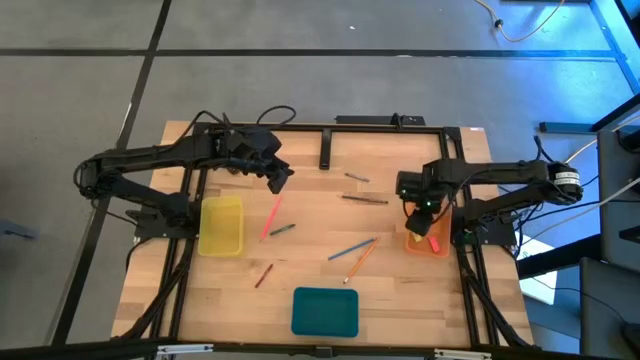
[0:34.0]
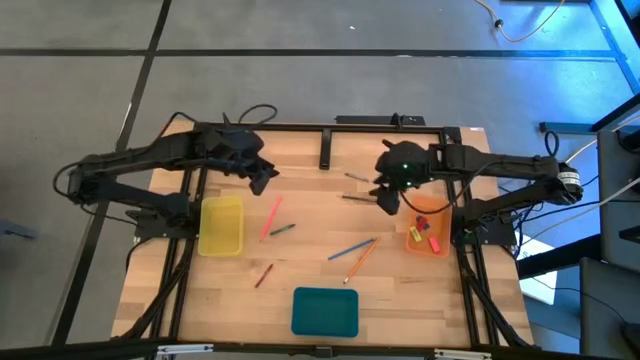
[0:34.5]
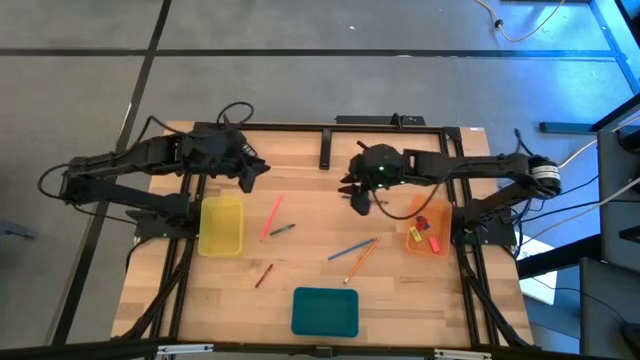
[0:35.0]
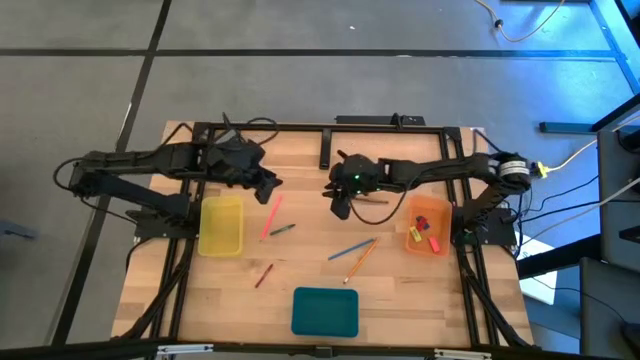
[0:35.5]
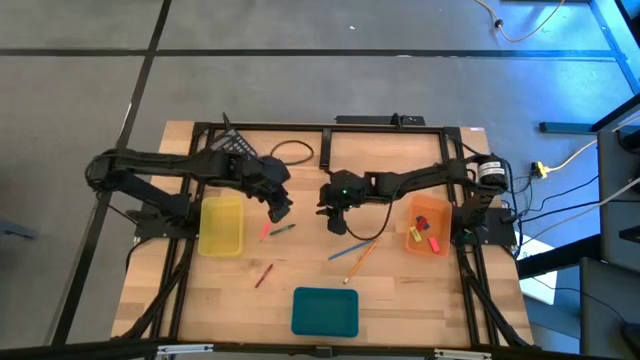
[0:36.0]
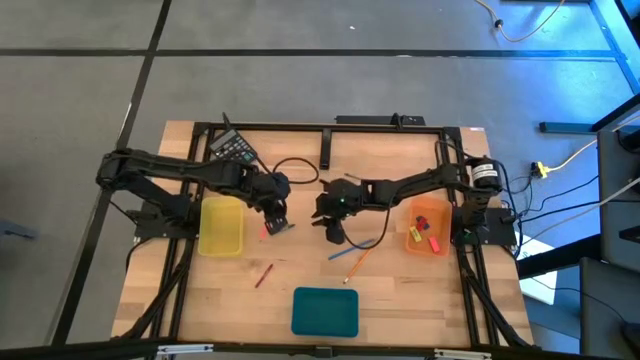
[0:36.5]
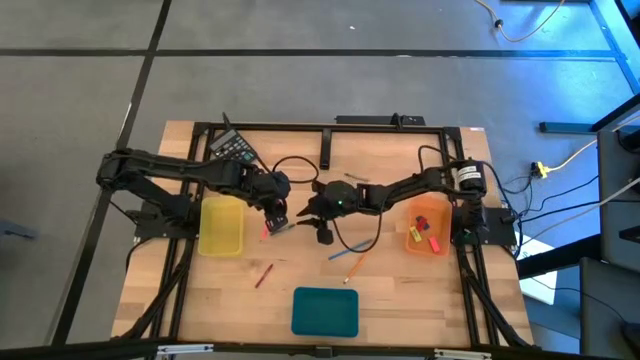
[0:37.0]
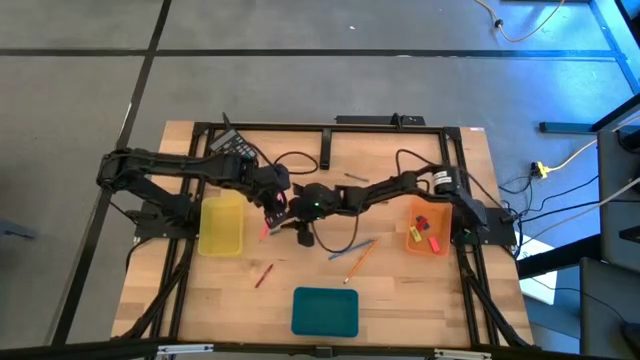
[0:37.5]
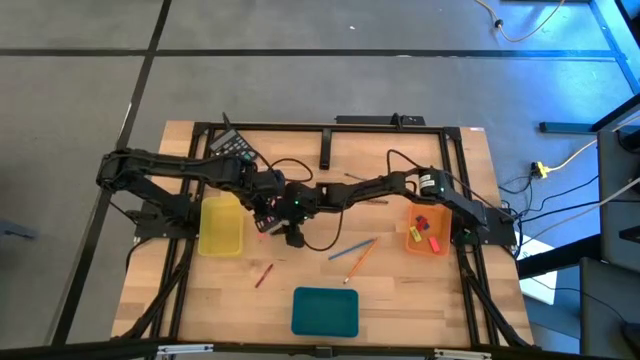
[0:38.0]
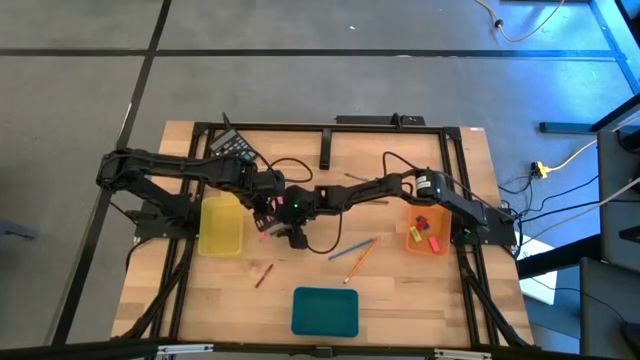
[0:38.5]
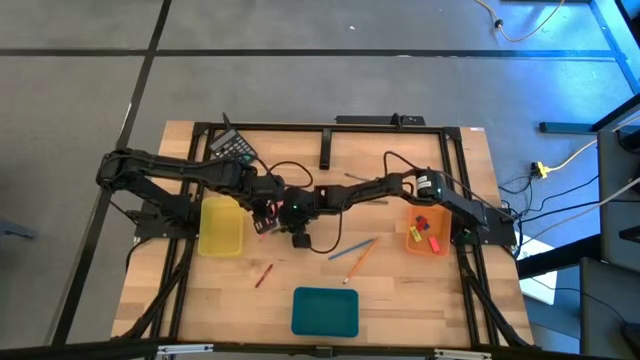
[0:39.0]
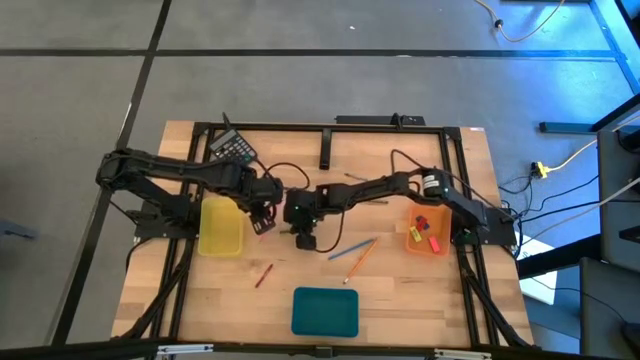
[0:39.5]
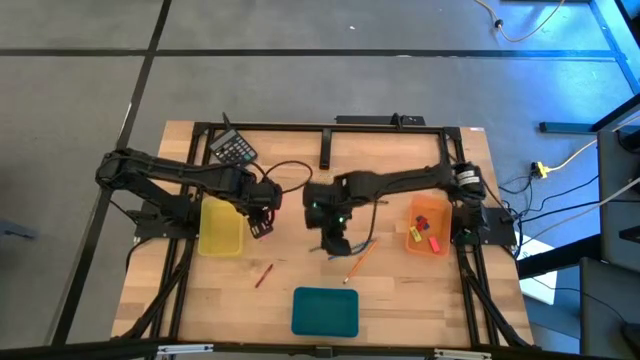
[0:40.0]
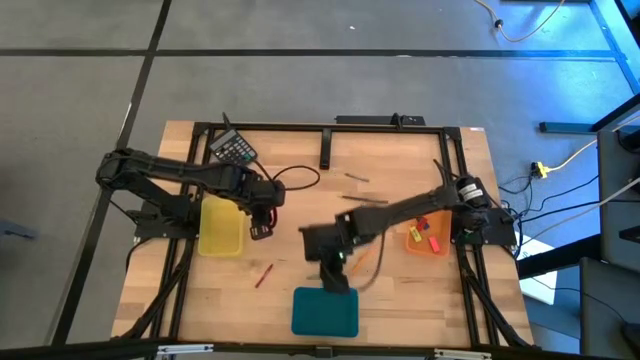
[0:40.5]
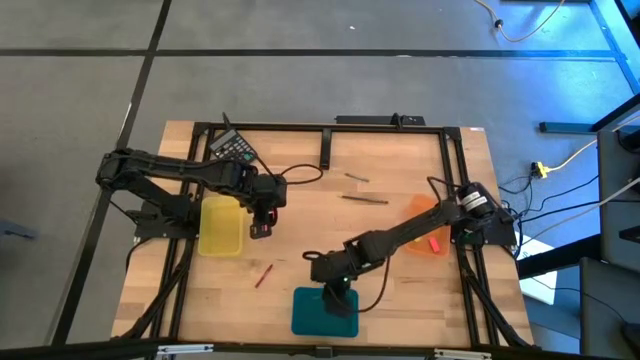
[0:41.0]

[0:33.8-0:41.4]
Task: Sort crayons/erasers/pens/pencils in bins
Put the green crayon into the blue bin

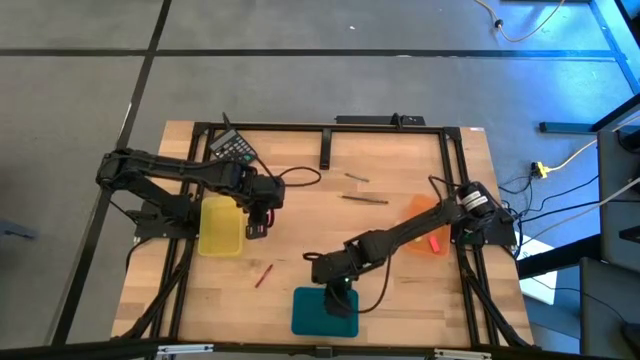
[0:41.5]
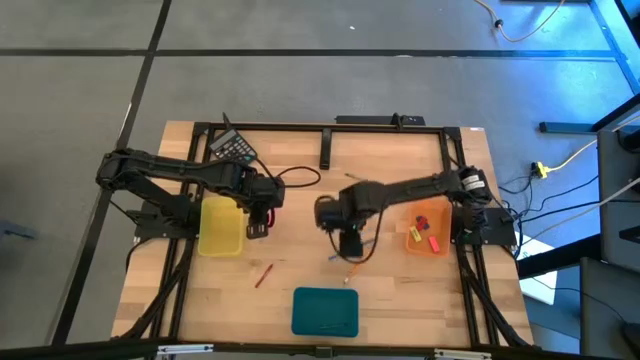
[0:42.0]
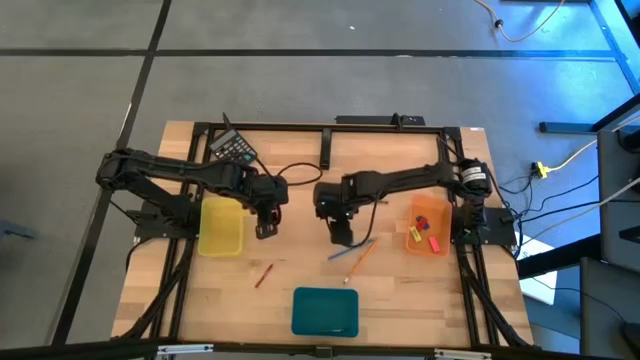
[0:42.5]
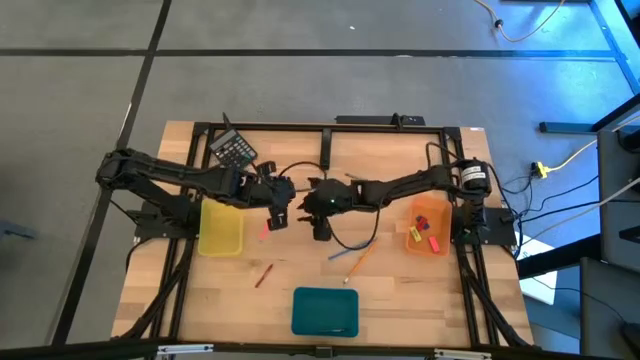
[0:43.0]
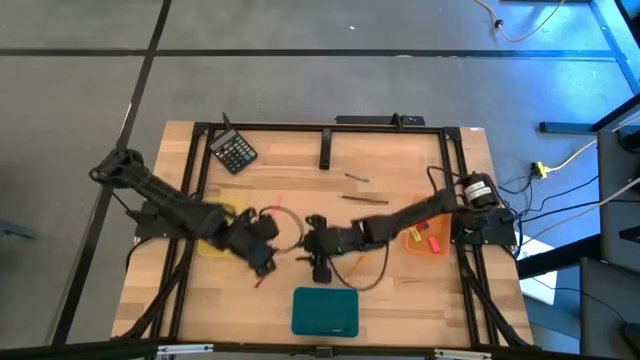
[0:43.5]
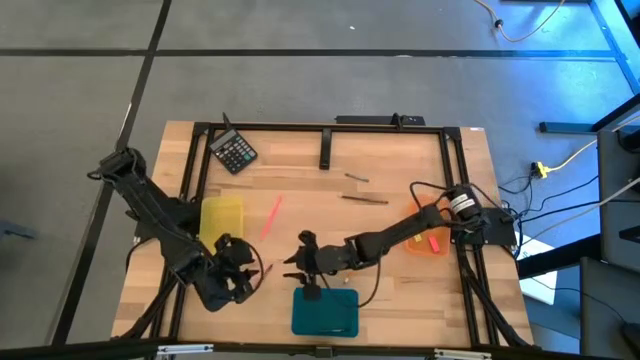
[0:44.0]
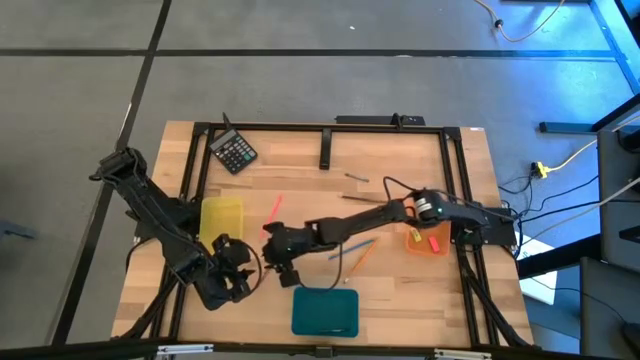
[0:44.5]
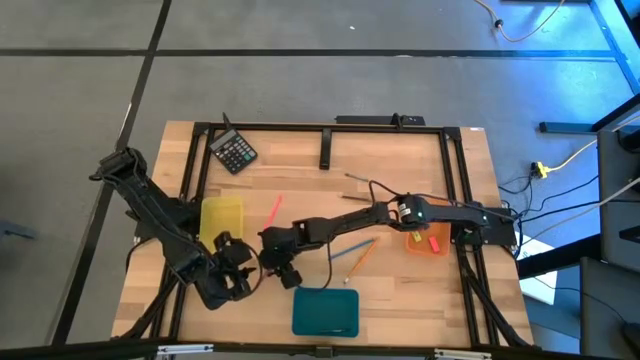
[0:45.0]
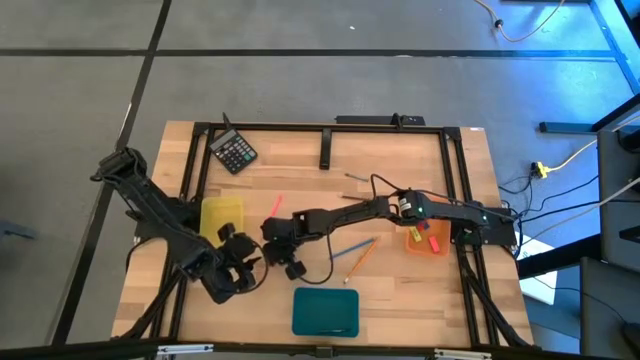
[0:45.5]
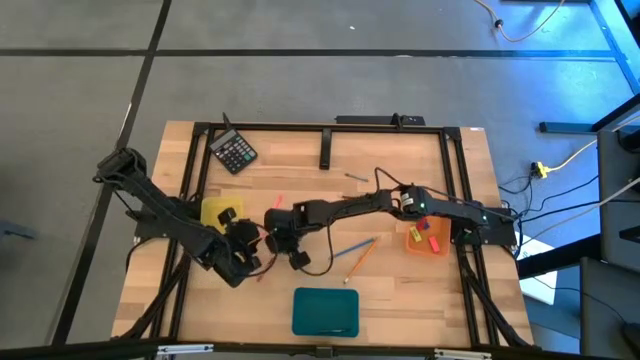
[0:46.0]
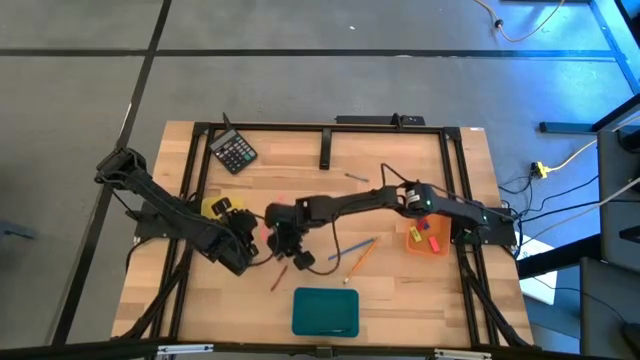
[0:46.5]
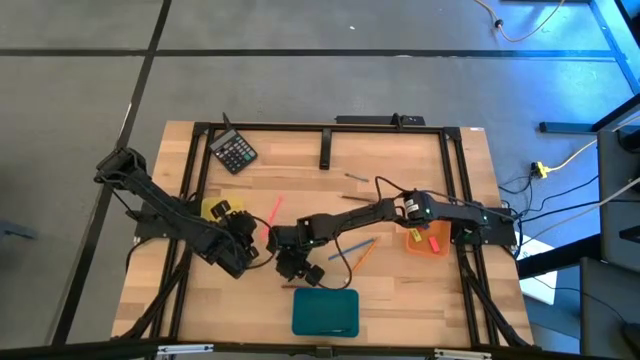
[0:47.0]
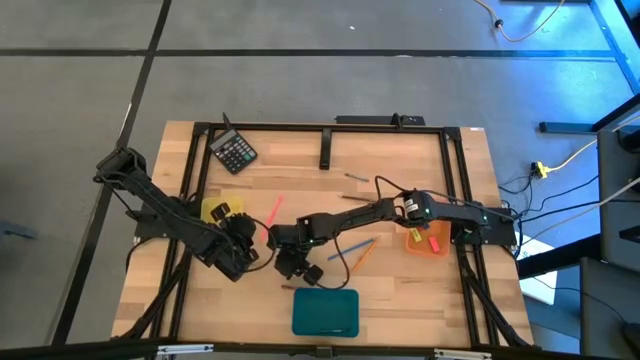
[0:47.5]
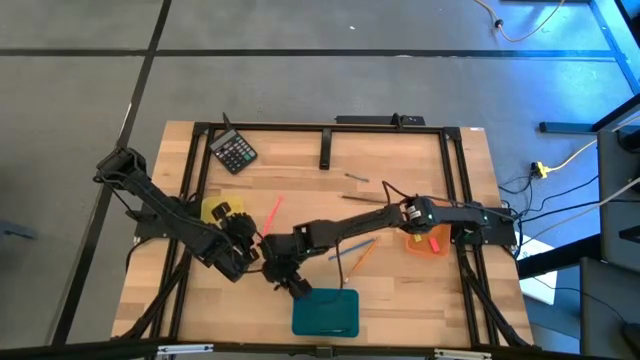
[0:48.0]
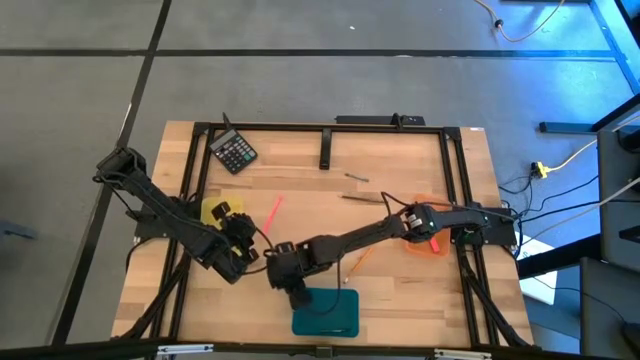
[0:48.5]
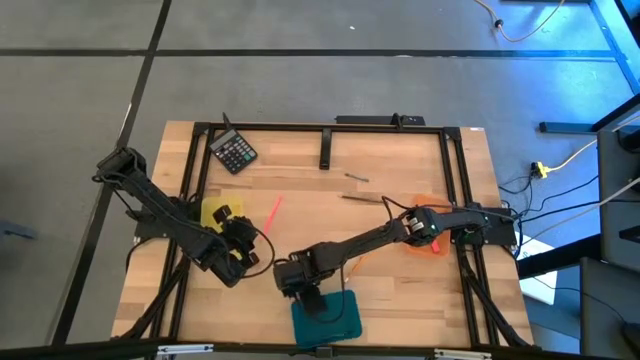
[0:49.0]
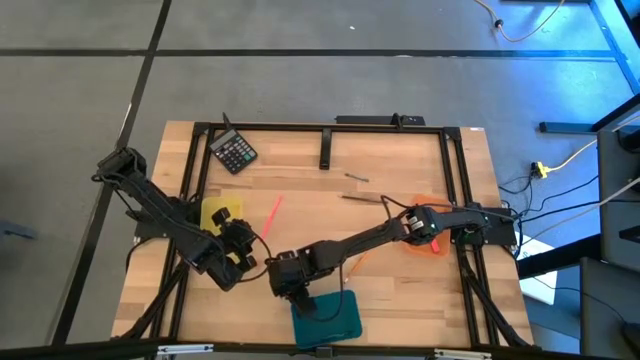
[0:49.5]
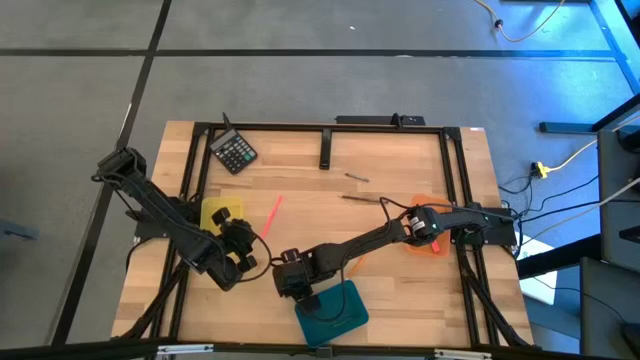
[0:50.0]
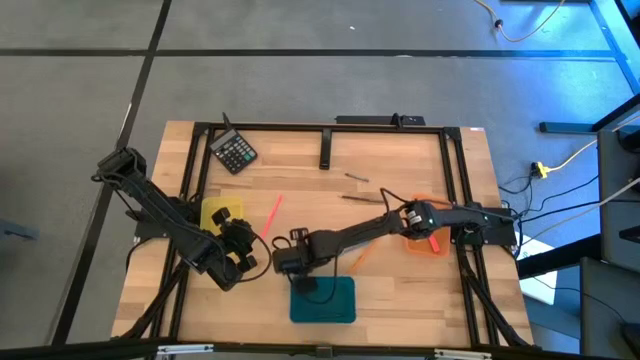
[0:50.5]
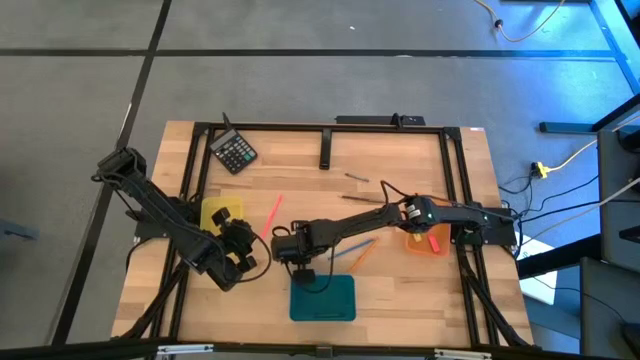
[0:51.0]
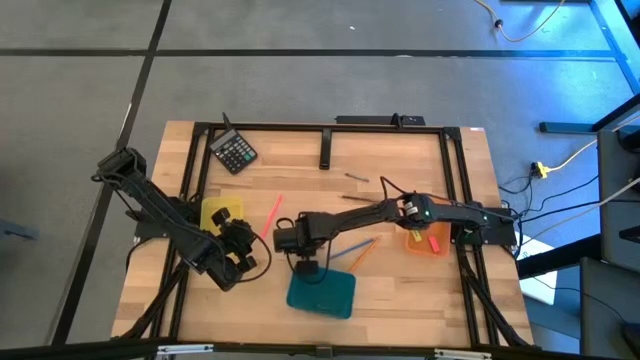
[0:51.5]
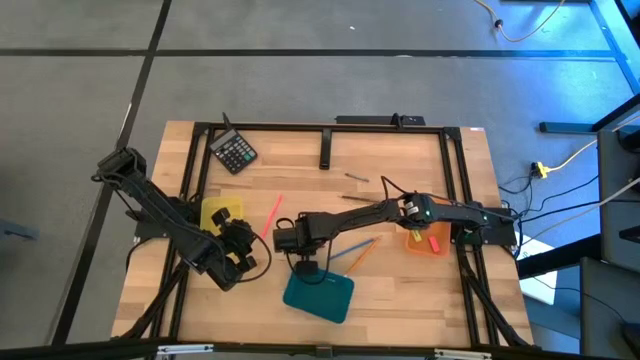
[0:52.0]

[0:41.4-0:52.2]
Put the red crayon into the blue bin

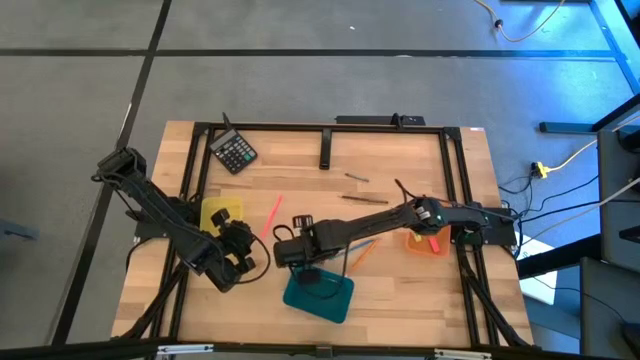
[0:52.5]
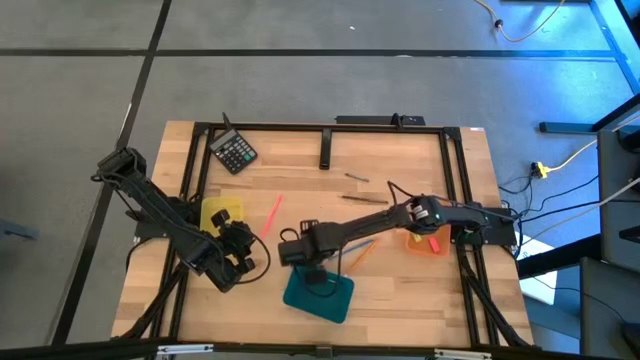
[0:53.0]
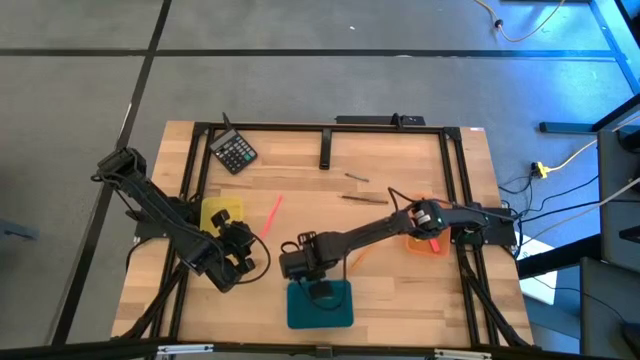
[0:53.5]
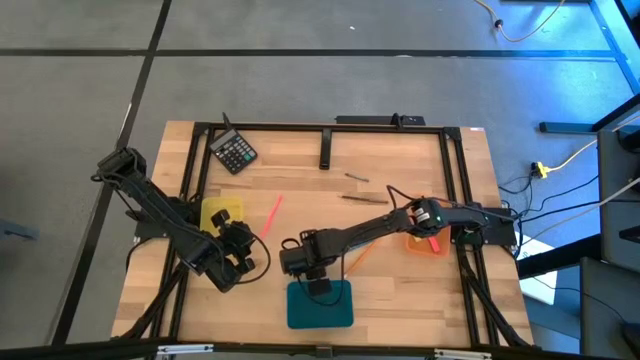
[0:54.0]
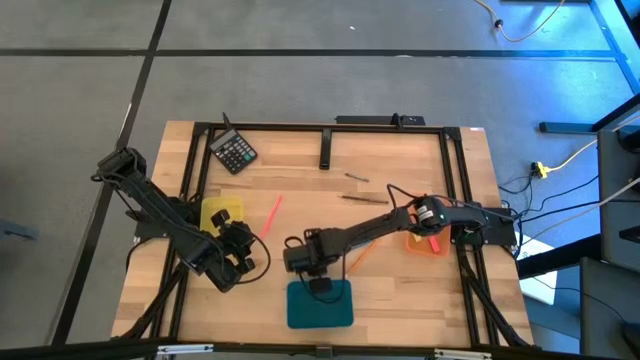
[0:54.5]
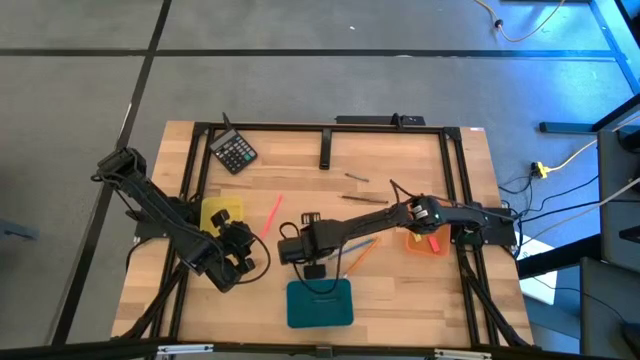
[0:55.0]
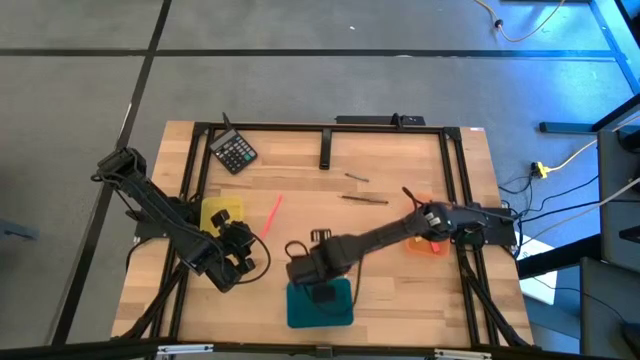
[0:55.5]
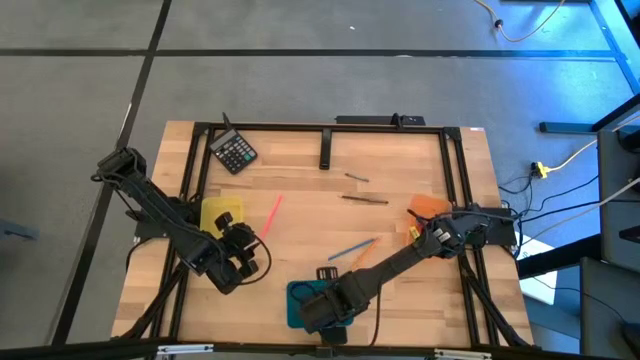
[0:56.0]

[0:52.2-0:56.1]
Put the red crayon into the blue bin
